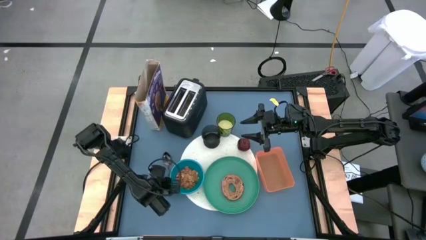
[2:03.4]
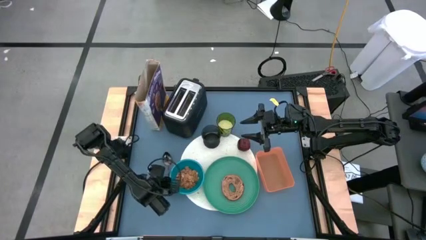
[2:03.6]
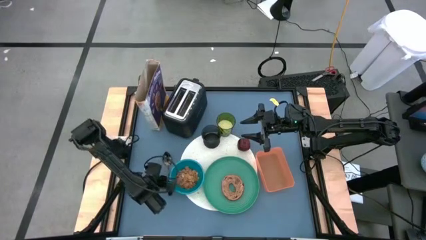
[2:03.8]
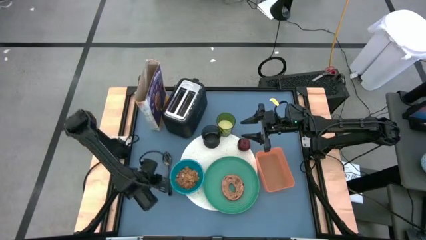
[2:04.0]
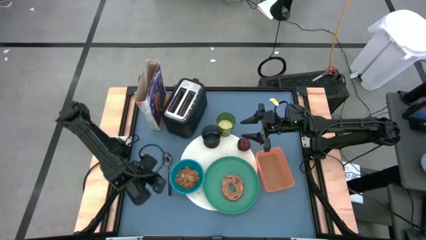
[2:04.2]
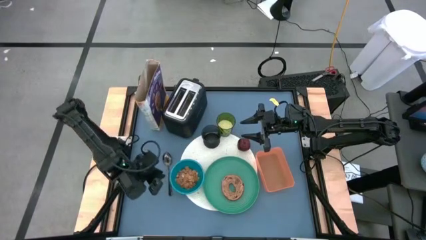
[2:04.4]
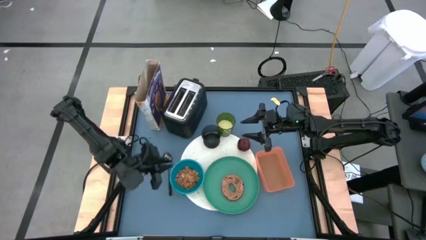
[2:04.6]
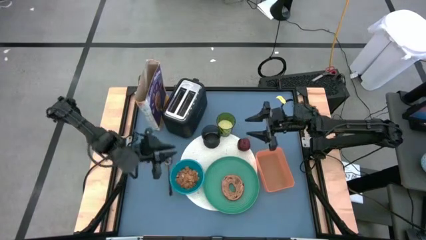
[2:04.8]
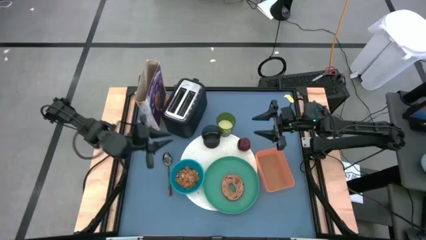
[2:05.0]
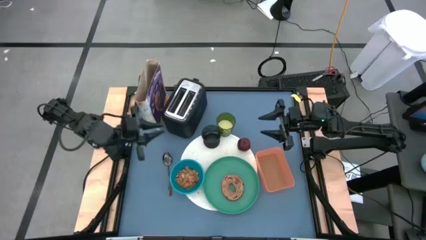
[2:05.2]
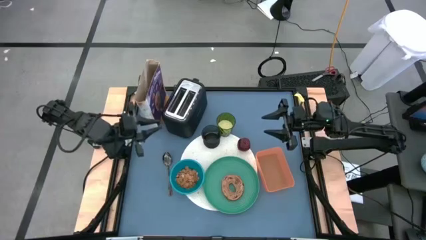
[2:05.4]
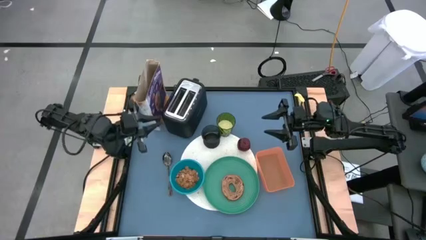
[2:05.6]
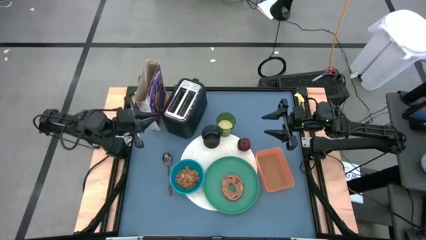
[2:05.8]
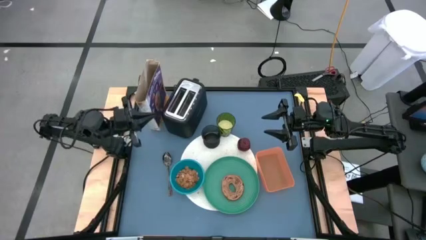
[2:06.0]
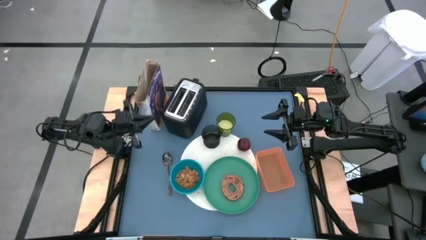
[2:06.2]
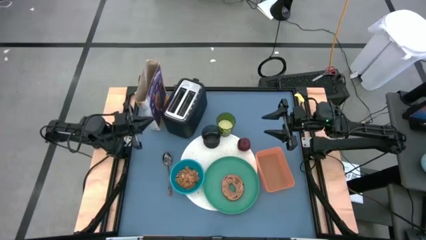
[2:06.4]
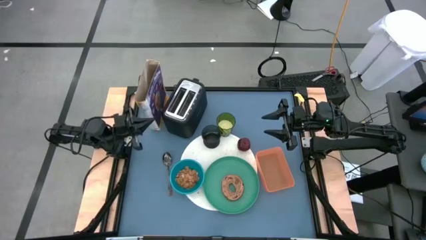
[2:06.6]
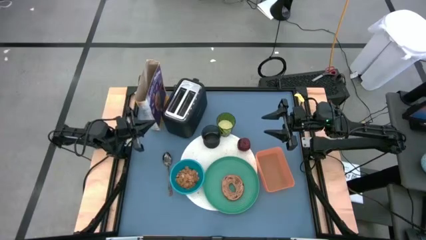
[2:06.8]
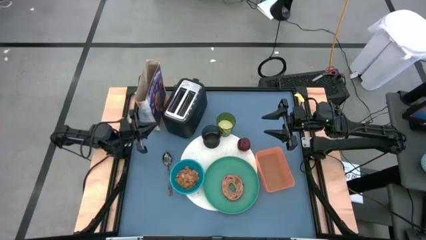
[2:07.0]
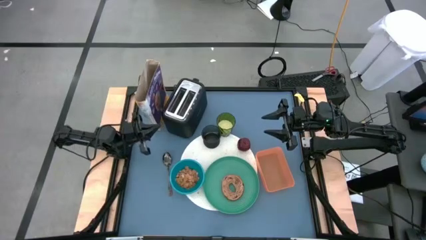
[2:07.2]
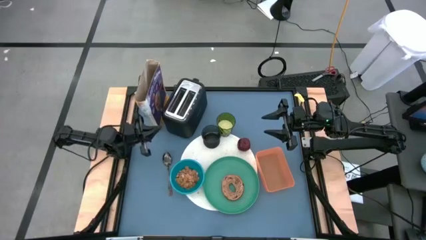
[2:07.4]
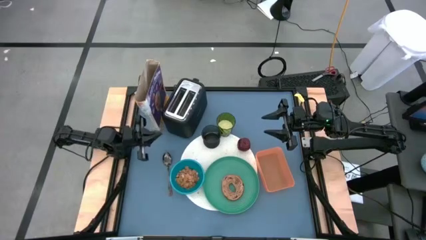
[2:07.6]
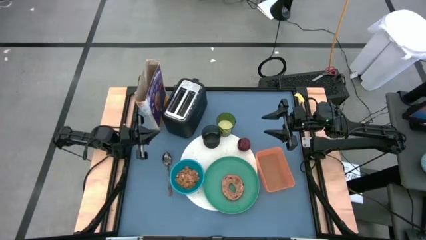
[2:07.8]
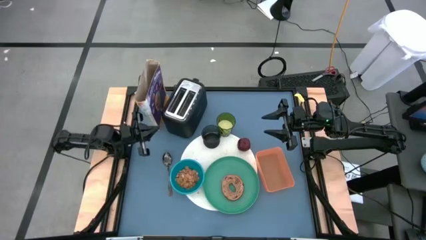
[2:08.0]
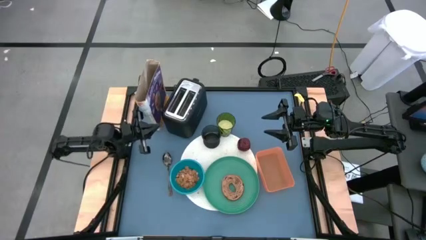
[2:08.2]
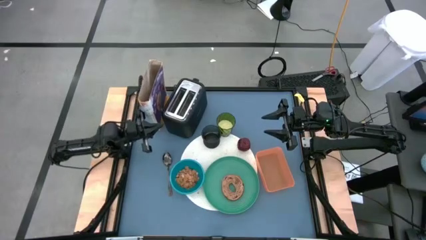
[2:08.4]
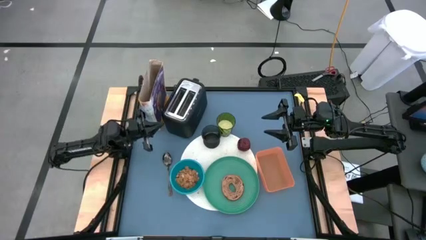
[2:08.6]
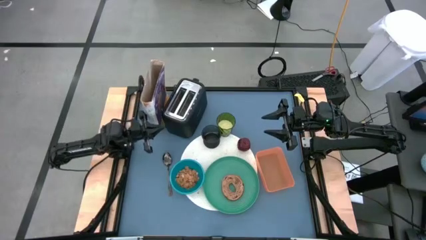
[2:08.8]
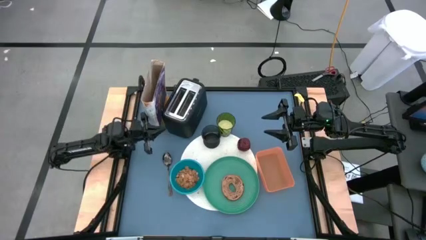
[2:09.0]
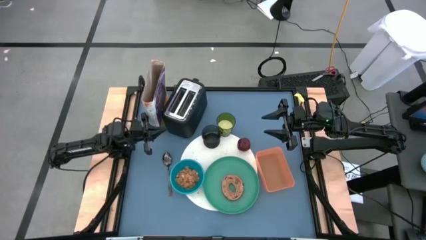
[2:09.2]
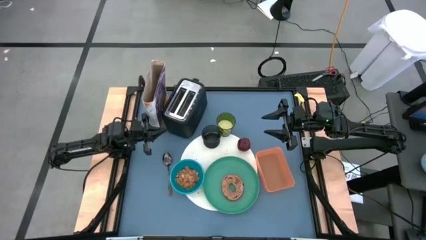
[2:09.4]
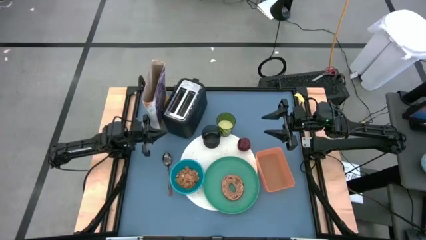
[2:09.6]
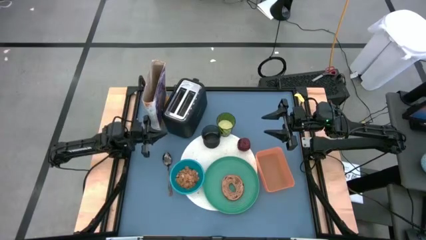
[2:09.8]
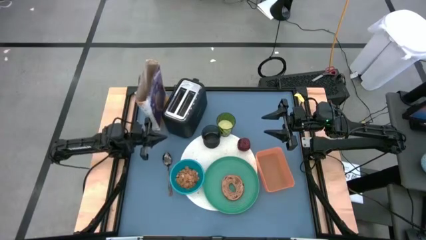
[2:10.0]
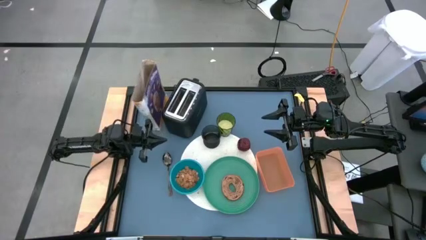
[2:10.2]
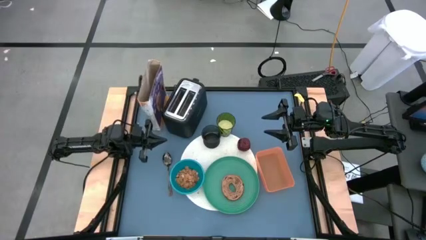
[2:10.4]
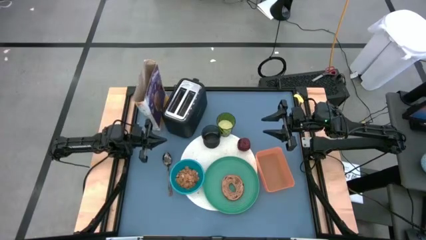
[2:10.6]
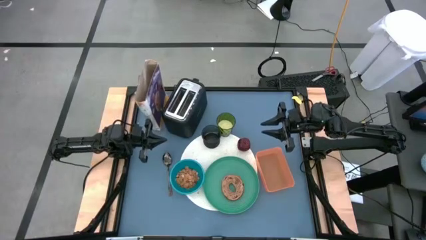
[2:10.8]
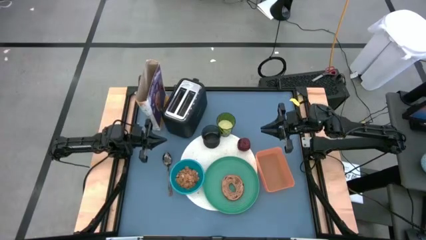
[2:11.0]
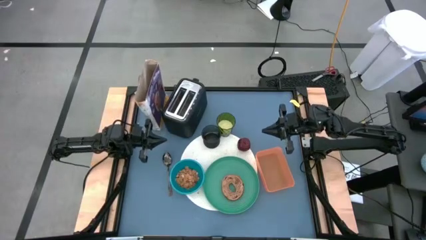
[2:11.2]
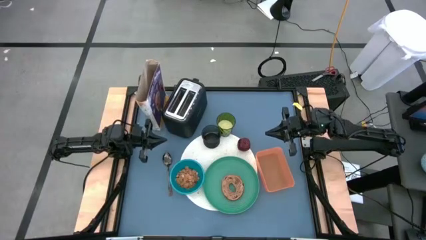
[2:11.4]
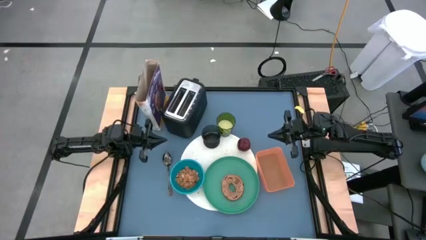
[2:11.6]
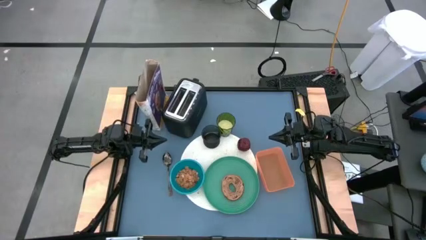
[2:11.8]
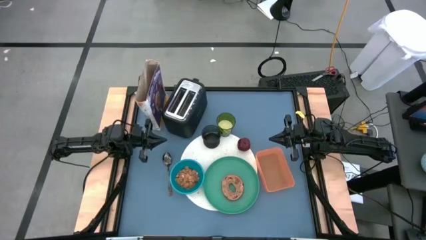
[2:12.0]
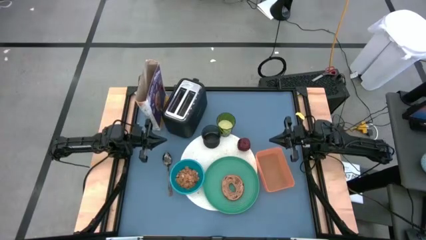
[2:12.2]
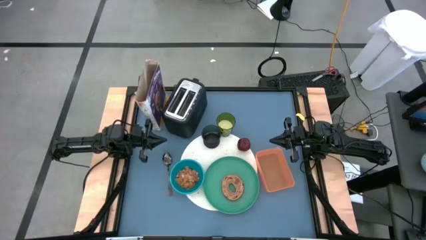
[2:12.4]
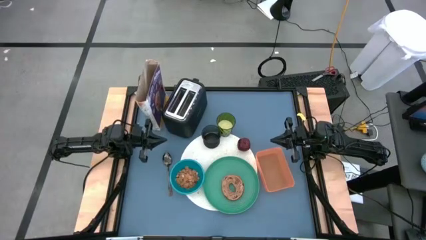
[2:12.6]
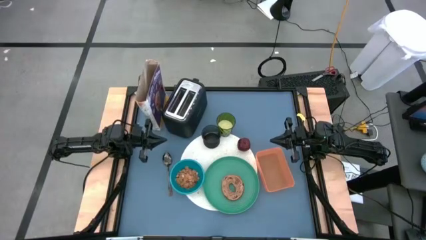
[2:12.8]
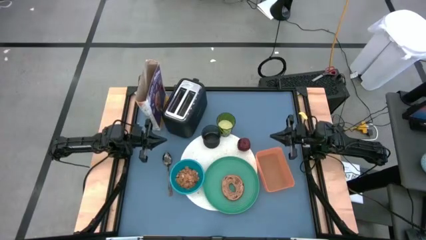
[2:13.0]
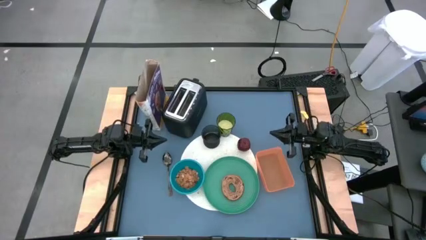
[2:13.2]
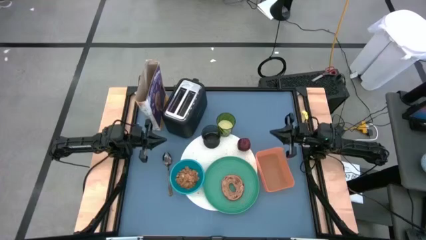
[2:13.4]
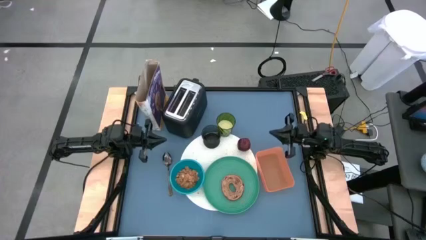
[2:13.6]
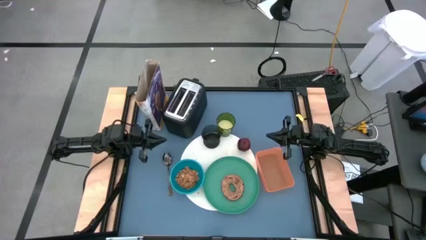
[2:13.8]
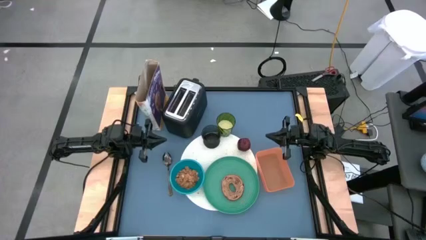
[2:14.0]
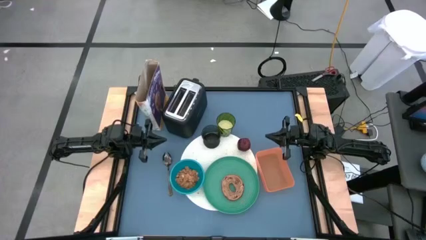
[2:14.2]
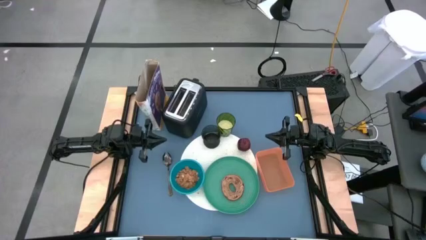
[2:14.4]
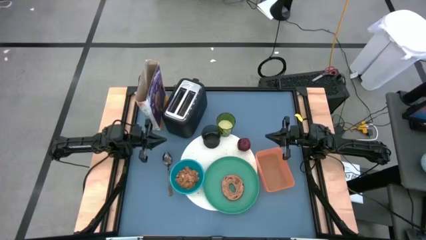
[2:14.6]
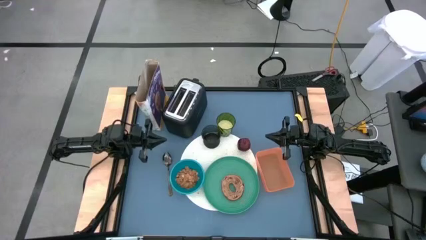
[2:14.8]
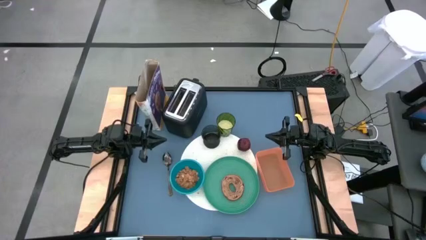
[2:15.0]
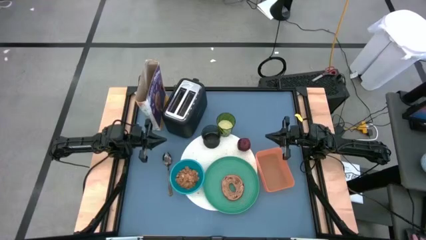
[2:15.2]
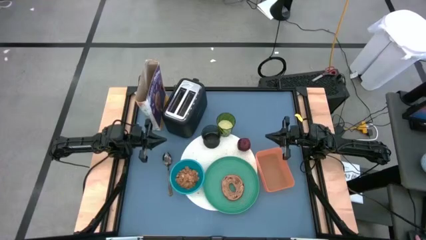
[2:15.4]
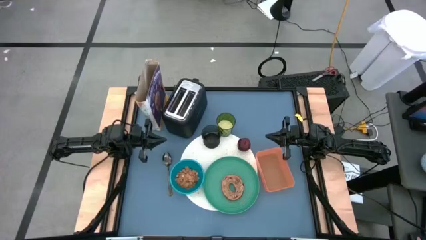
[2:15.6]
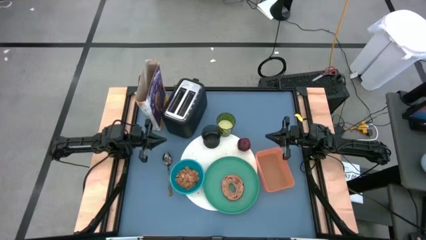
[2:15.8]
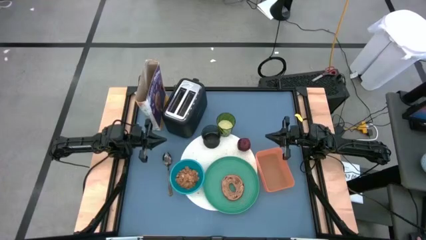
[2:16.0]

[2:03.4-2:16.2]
Task: Arrange a breakfast setting
Return to Home Position
